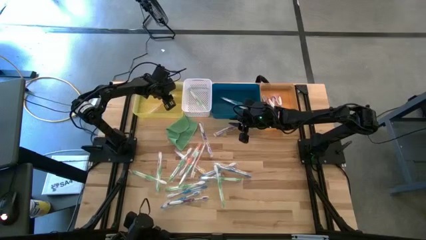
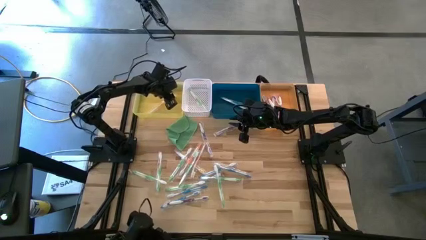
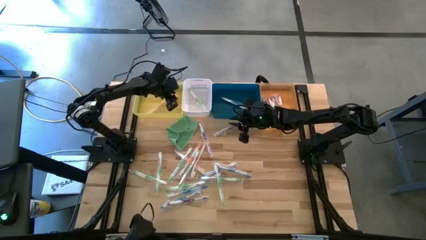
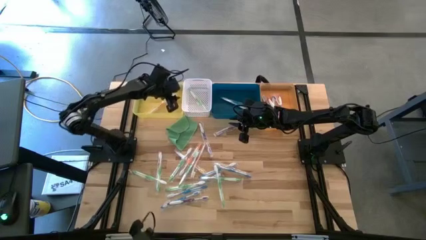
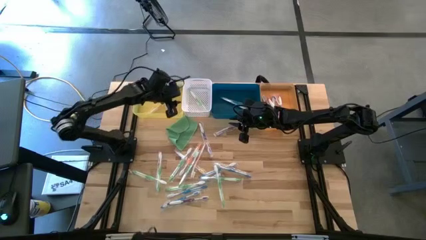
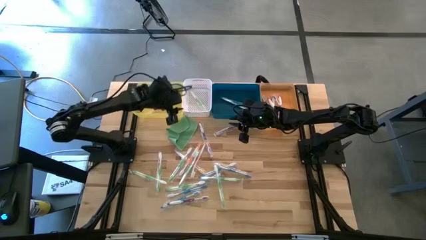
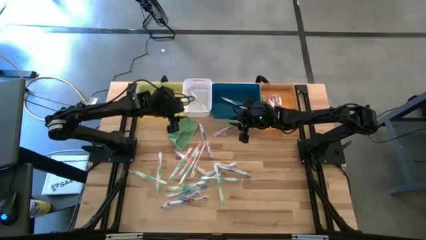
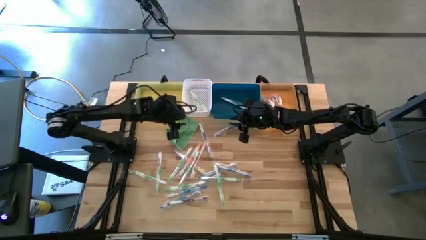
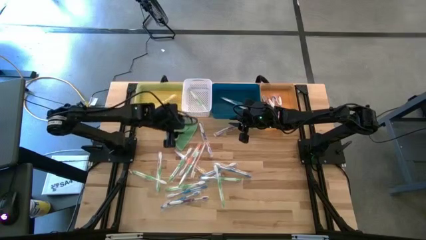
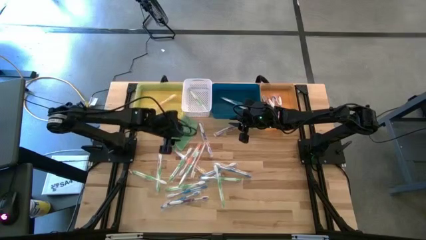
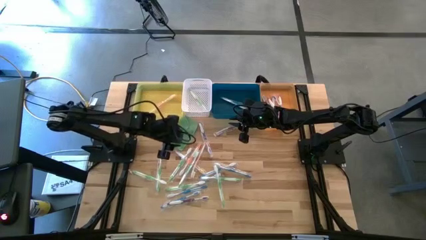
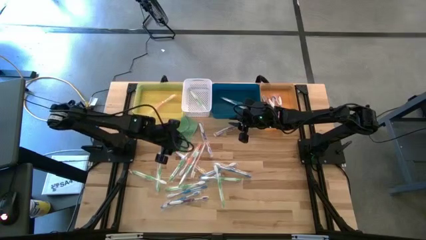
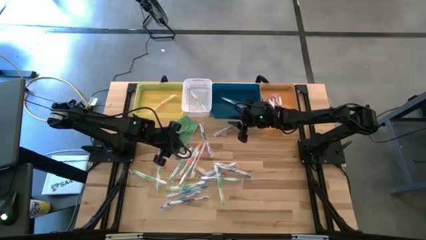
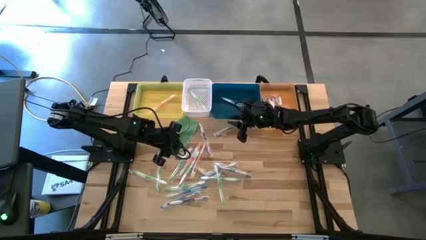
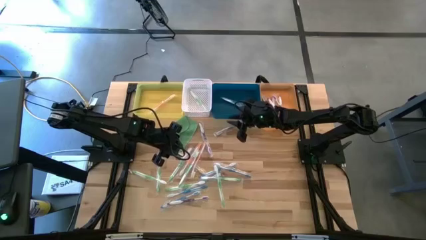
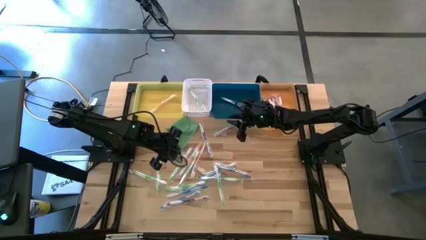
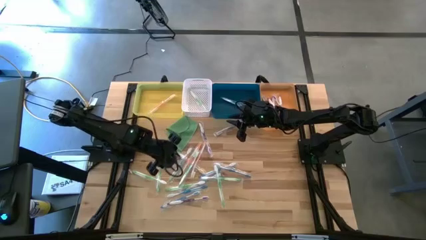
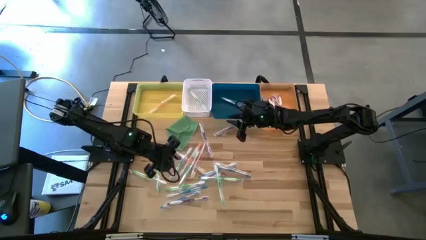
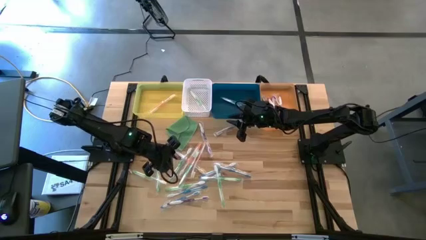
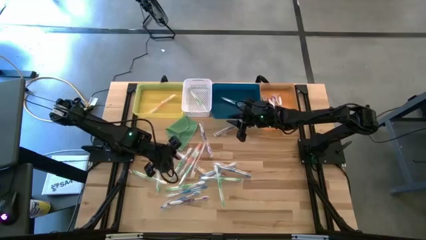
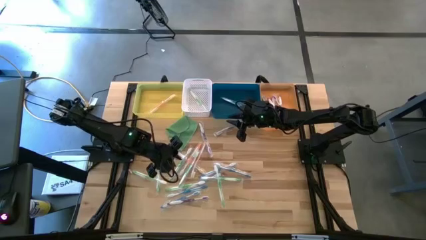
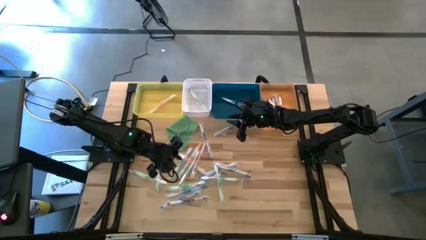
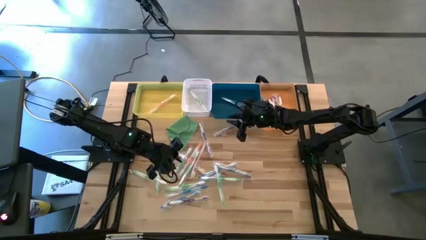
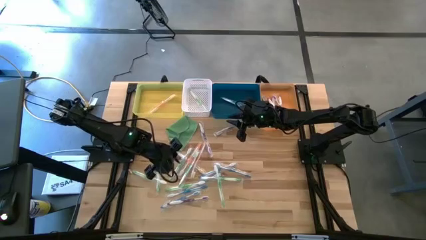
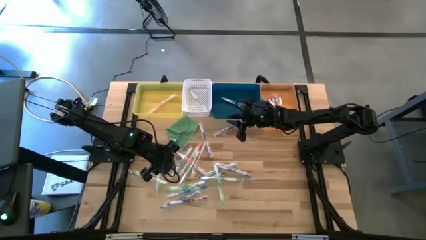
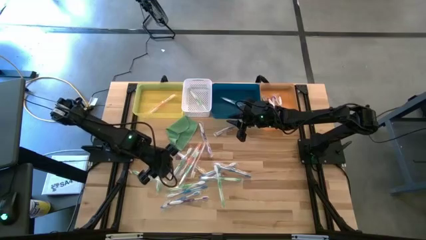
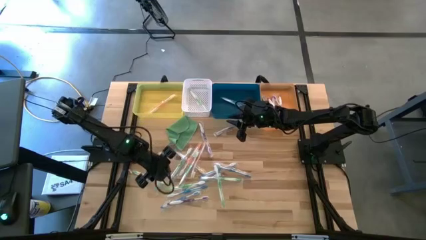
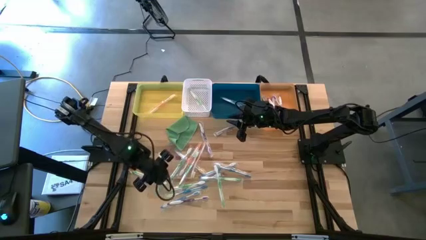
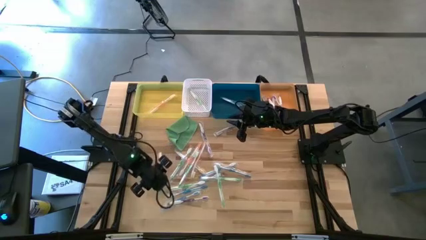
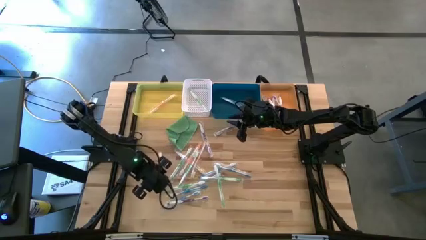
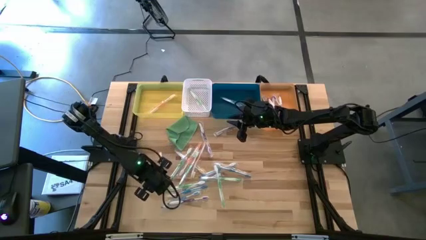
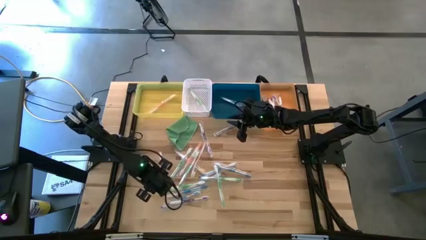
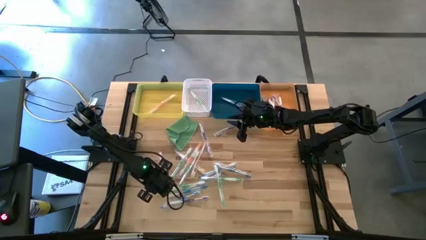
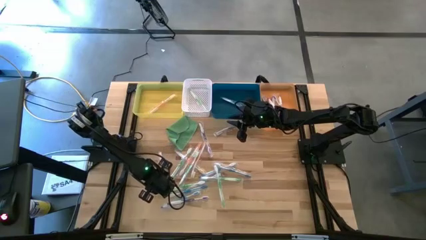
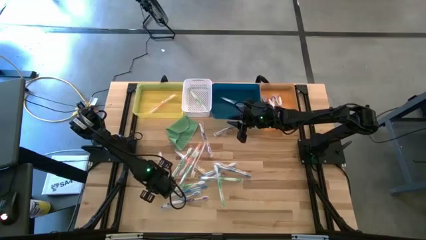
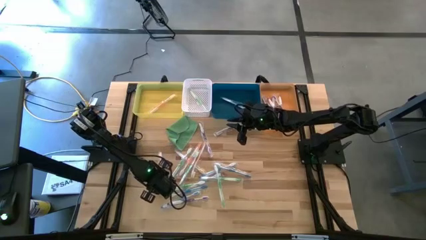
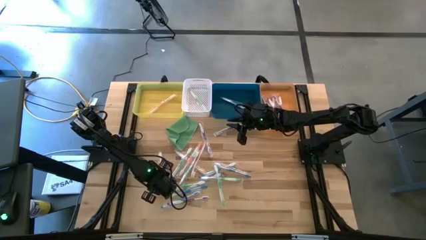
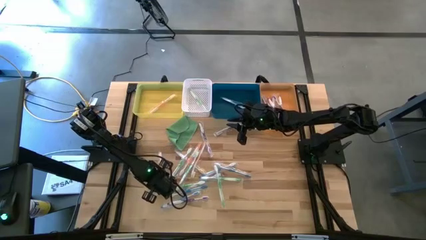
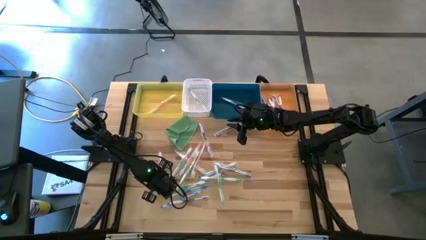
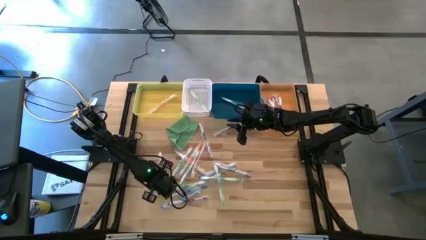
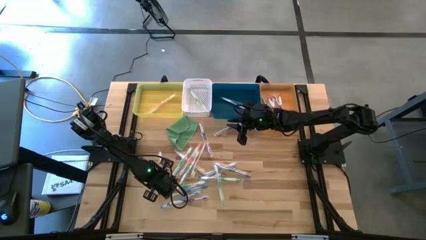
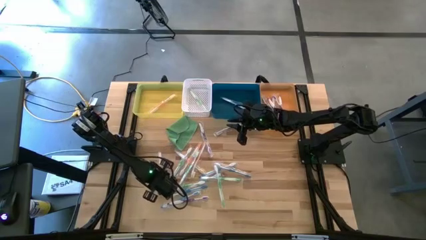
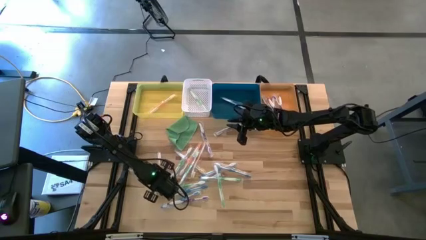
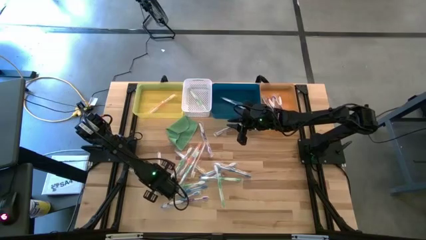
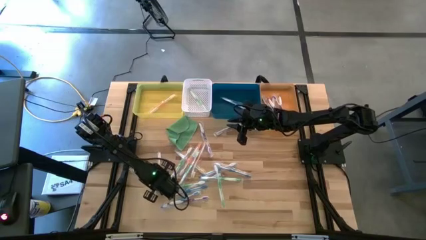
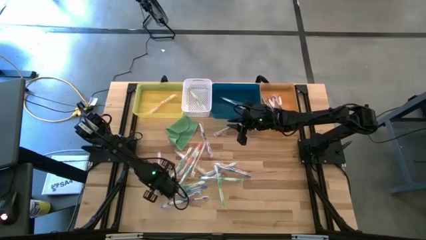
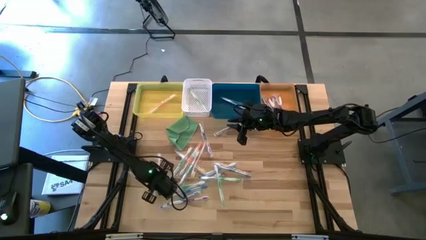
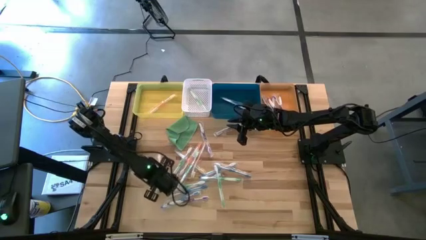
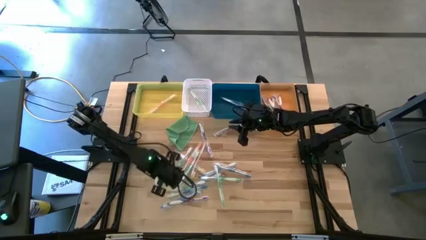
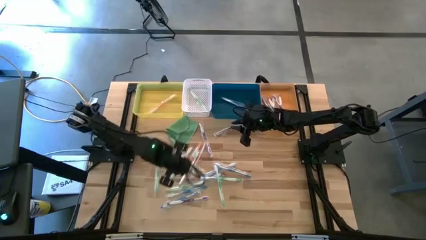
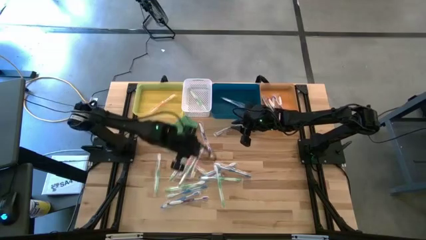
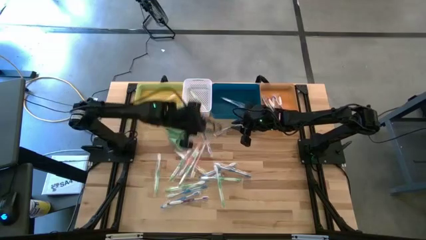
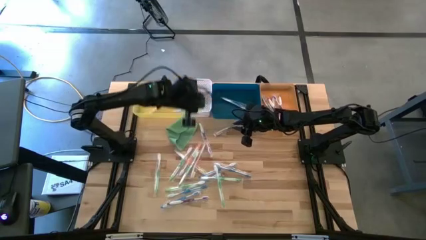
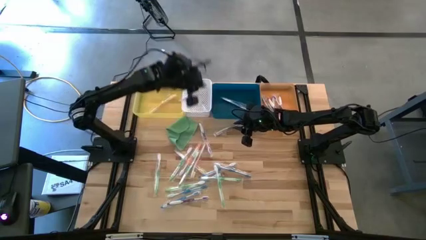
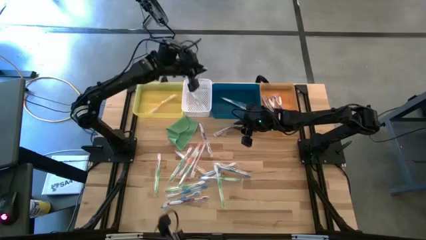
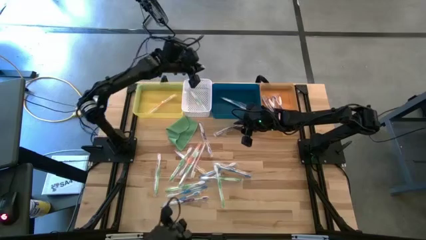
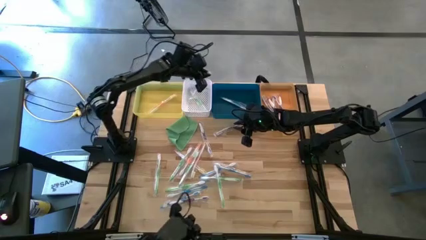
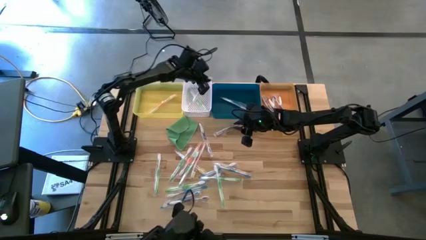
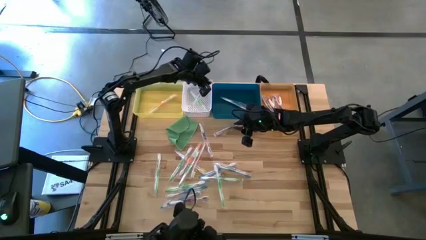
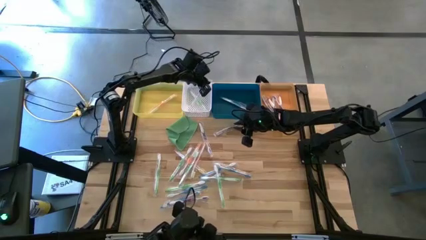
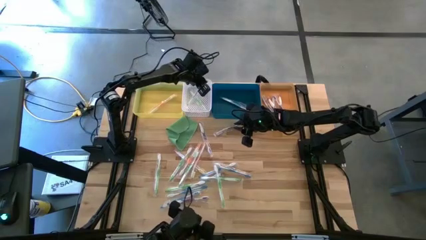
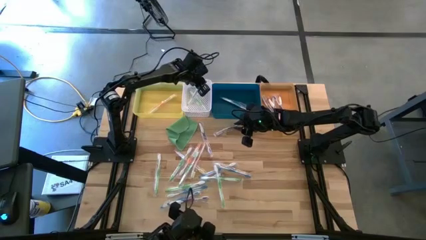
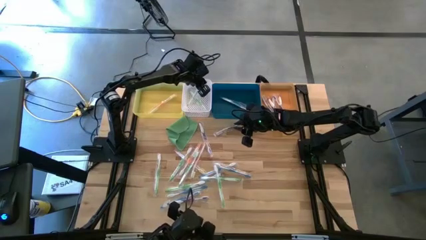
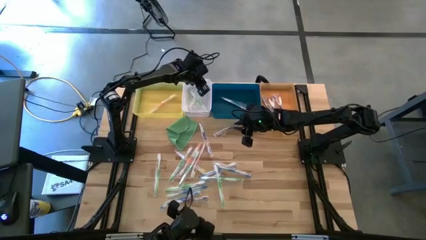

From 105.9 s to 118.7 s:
Task: Pick & Place Toothbrushes
Put the green toothbrush into the white bin

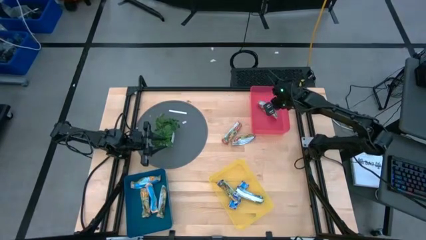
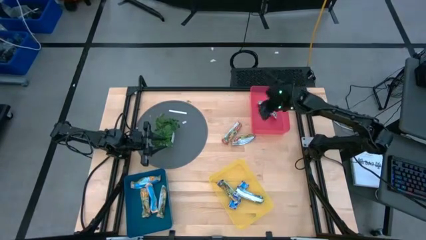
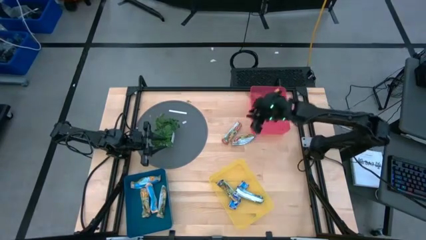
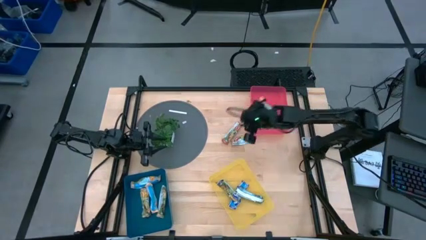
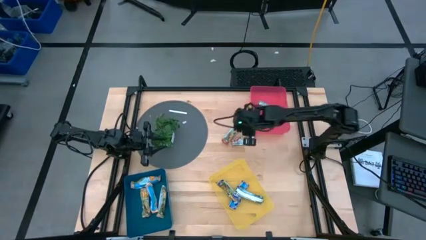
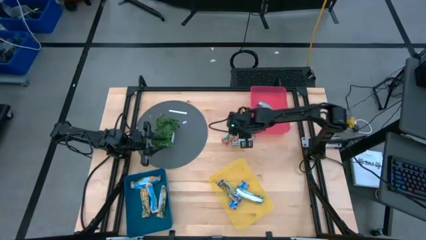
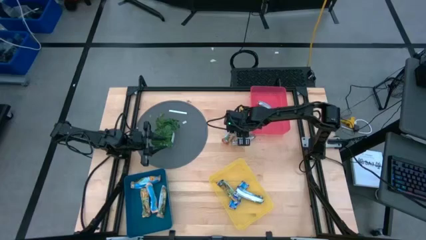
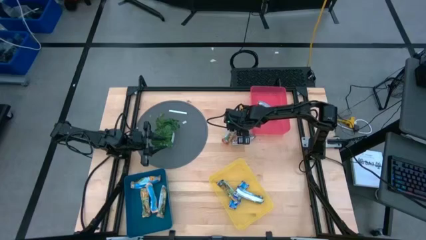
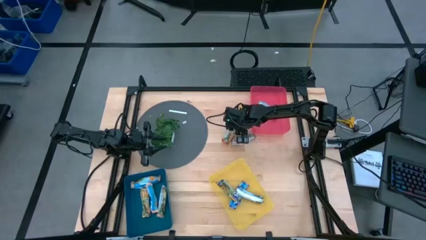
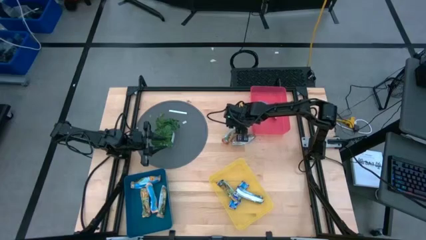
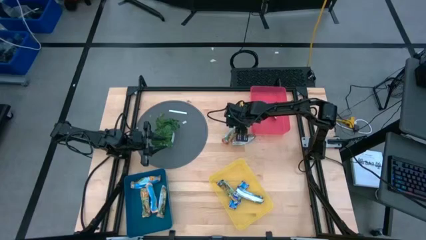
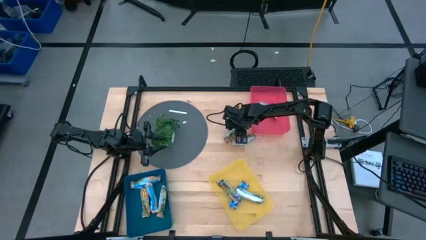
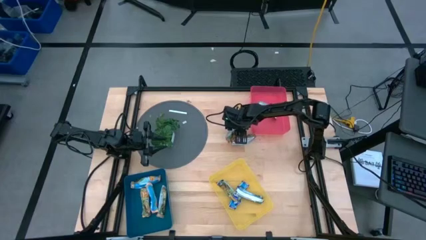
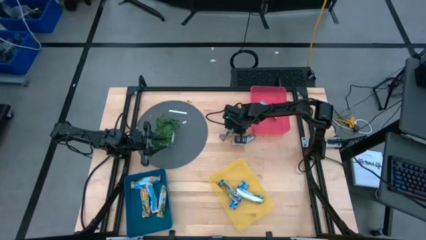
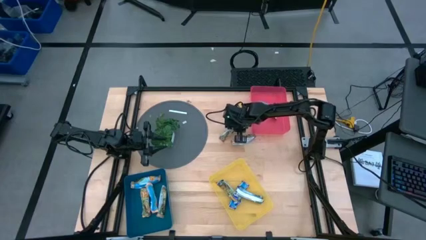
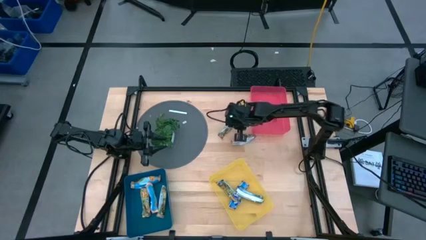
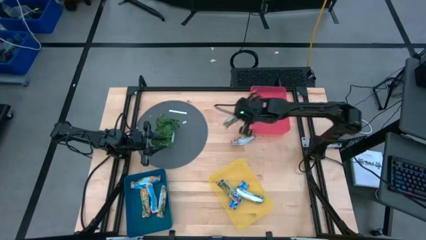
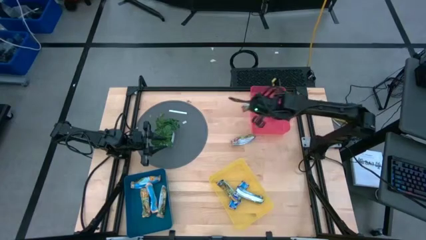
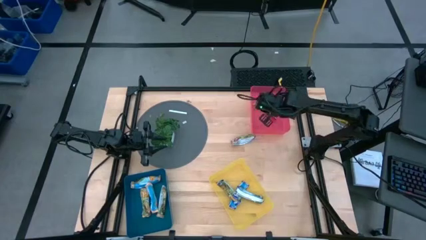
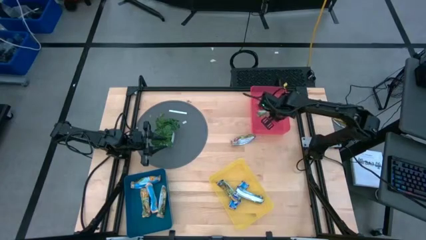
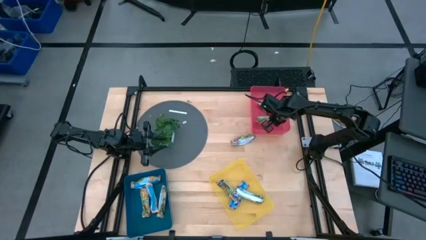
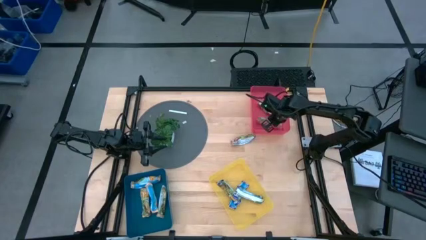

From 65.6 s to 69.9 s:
Task: Pick and place Granola Bars by type
Put the red snack into the pink bin
